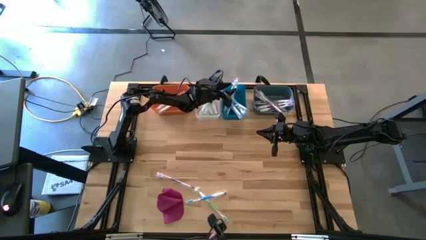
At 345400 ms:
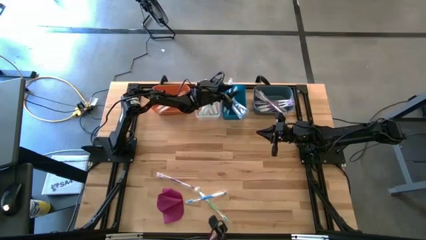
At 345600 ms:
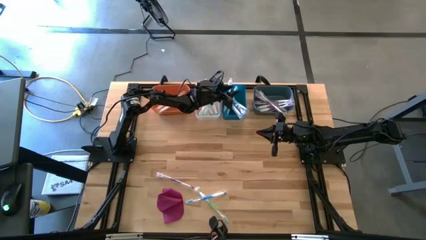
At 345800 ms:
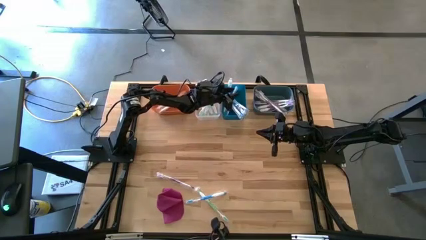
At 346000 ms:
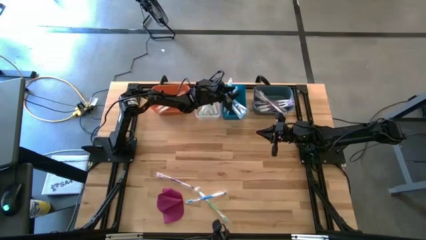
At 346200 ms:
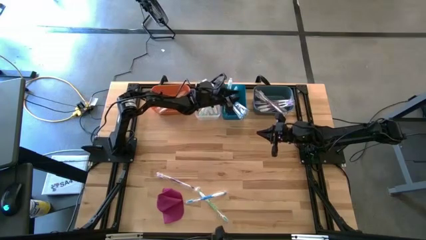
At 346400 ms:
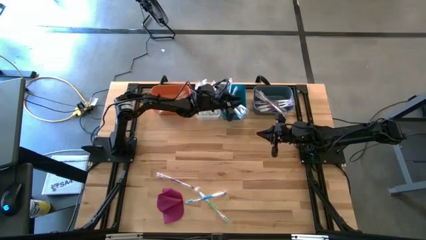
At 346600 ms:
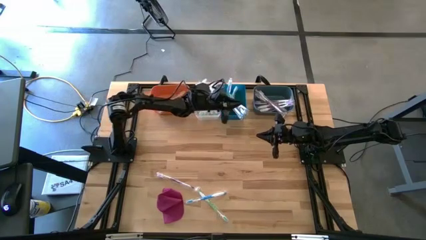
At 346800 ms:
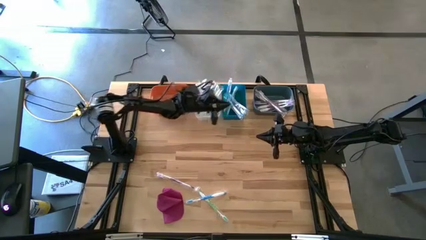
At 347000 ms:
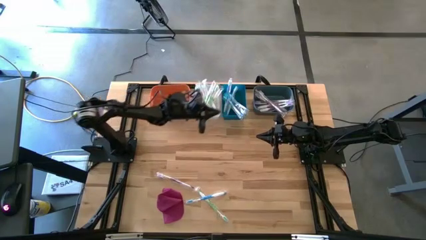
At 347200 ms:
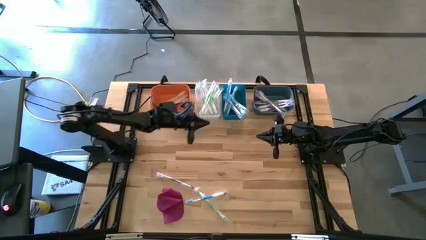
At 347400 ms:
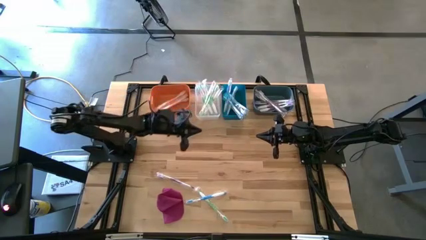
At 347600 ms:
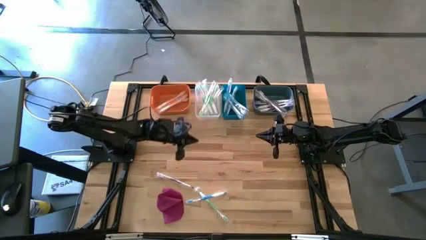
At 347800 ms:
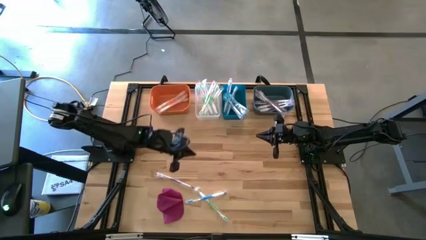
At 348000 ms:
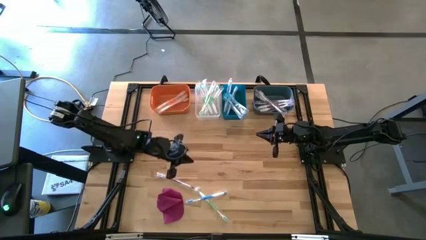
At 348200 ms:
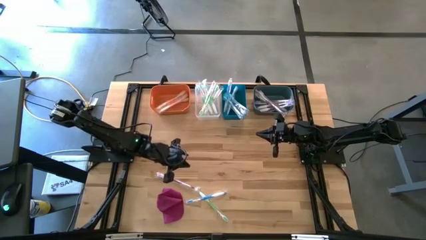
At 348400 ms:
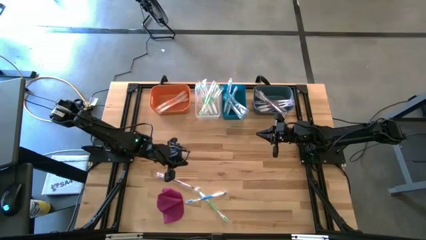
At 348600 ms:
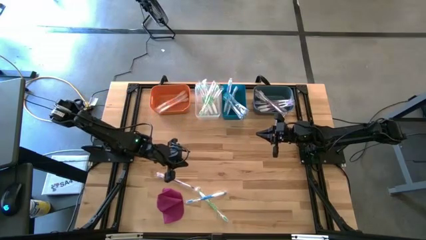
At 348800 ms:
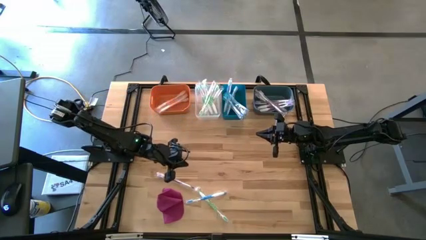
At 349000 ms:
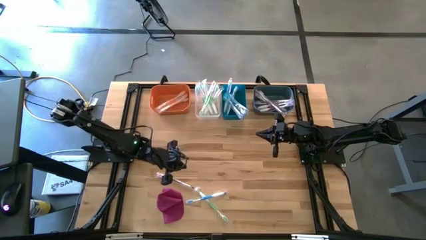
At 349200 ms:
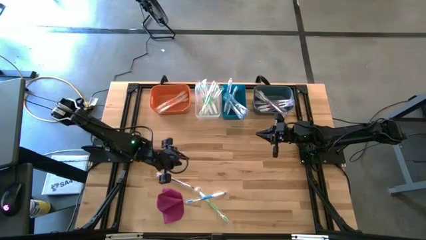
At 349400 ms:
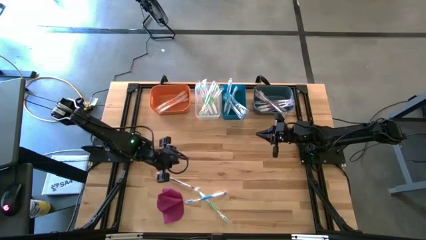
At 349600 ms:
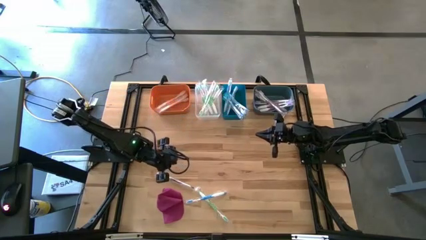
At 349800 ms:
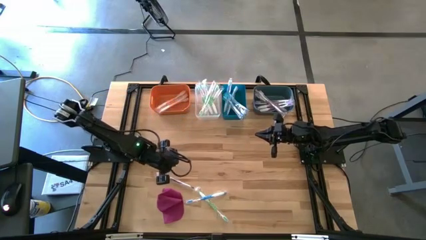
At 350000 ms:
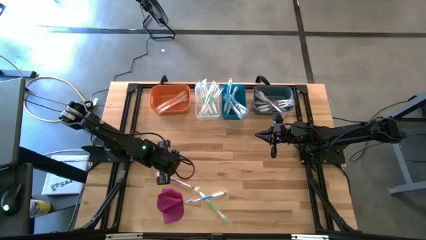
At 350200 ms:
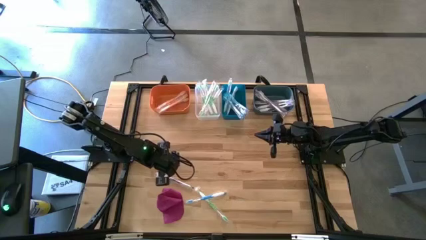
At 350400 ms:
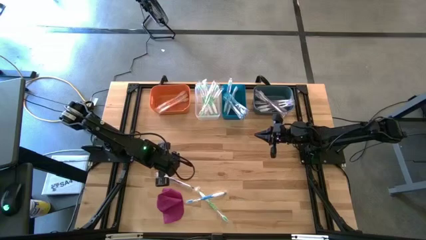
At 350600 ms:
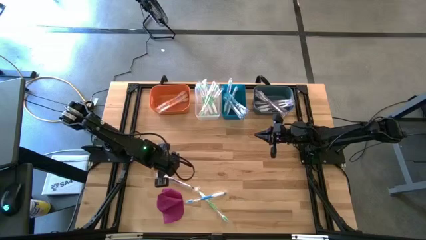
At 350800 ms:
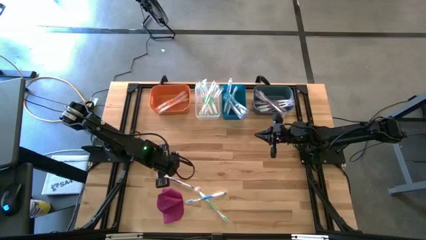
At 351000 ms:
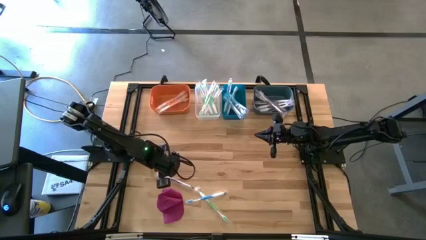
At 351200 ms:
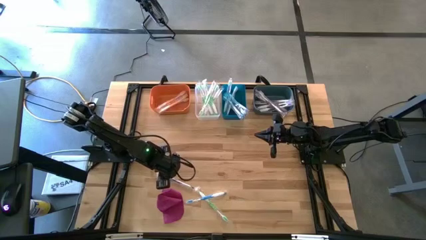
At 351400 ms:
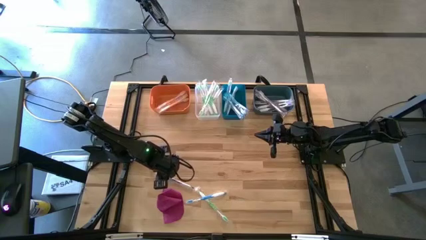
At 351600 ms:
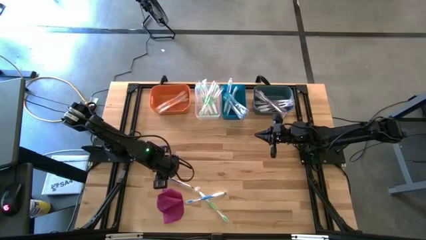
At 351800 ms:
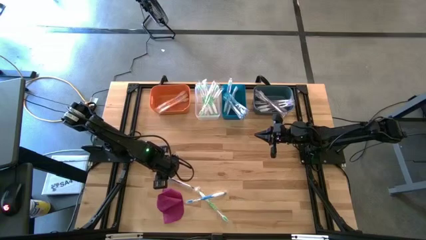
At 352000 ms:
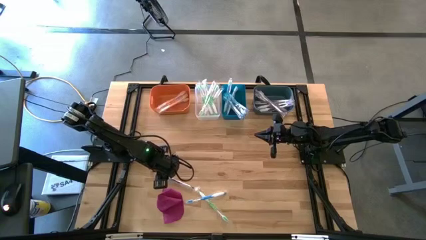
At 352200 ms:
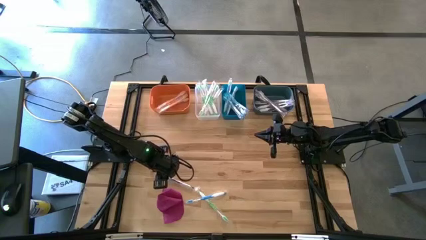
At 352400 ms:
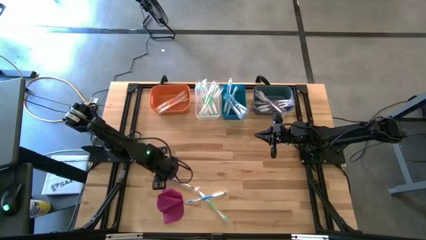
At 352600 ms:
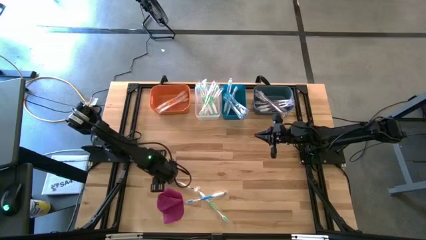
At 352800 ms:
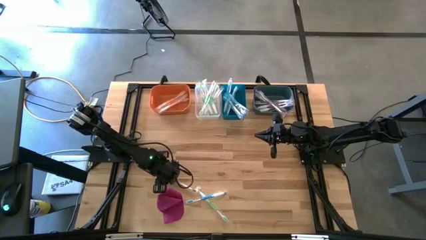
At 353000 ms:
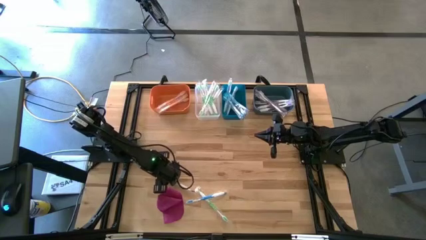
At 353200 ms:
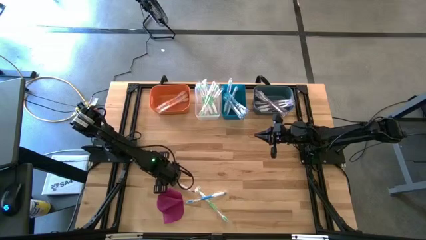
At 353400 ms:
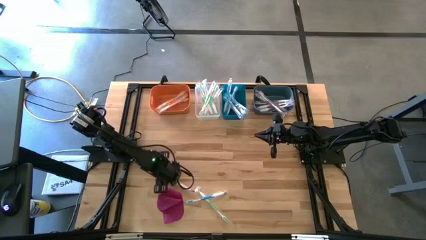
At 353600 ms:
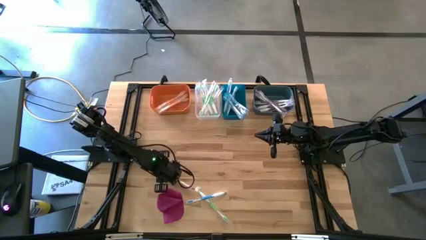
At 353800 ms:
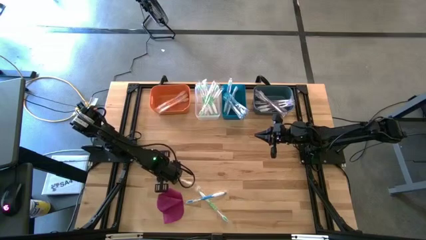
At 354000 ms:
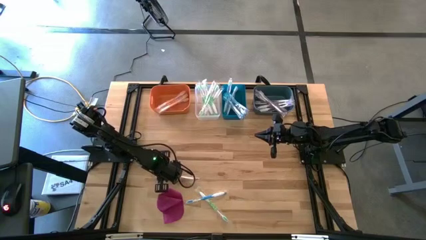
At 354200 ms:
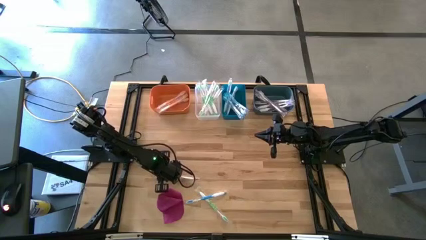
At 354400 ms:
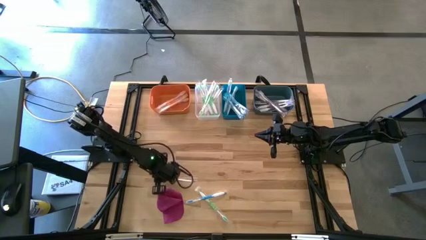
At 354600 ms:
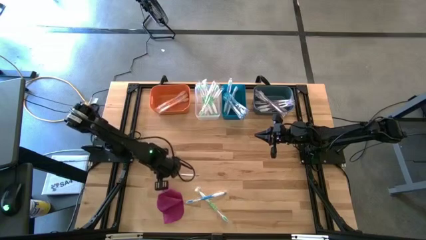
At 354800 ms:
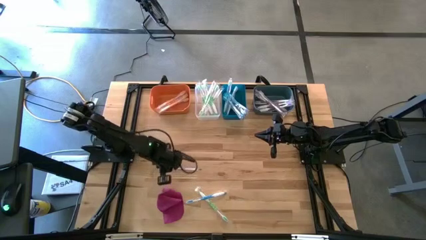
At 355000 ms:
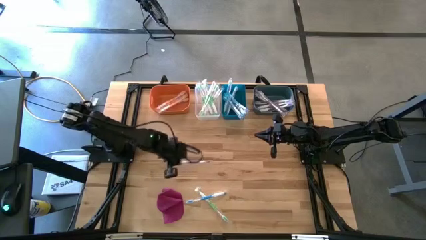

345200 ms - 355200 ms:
Task: Pick & Place Toothbrushes
Put the purple toothbrush into the green bin
